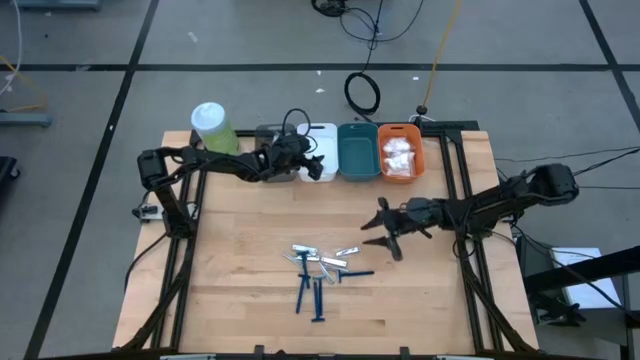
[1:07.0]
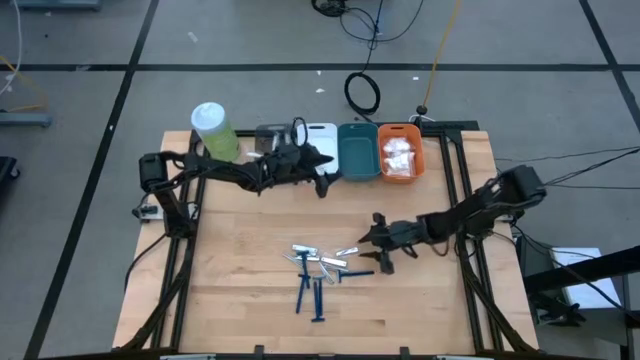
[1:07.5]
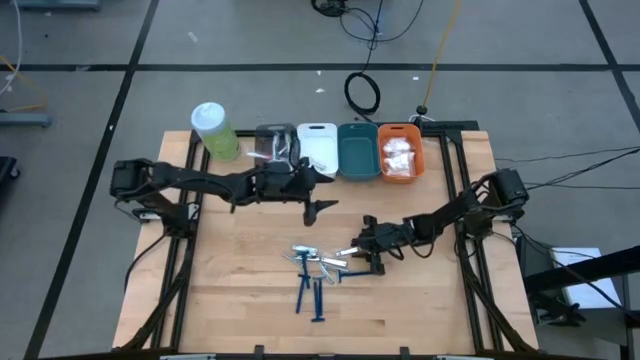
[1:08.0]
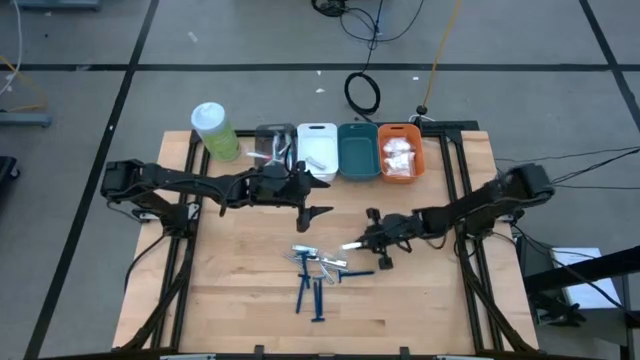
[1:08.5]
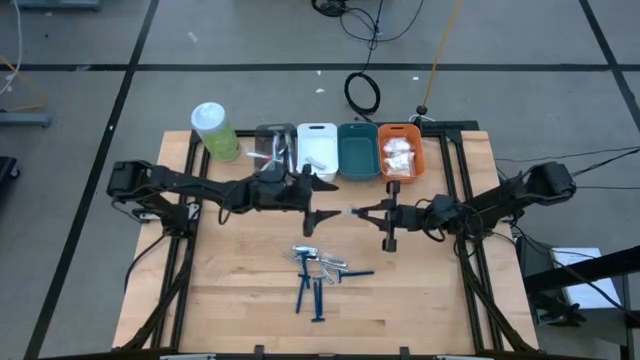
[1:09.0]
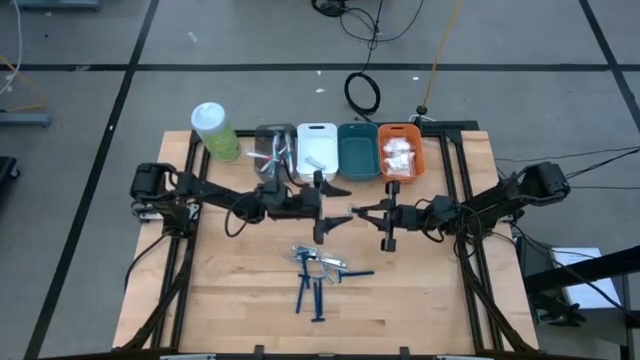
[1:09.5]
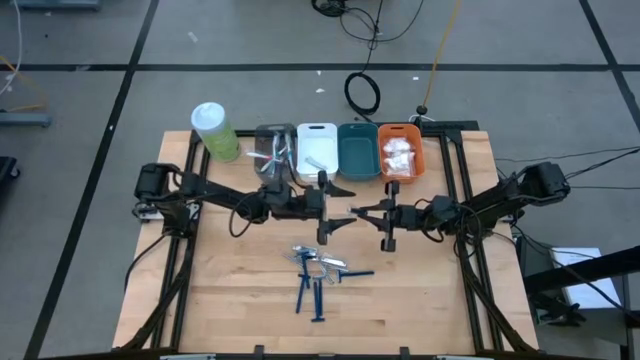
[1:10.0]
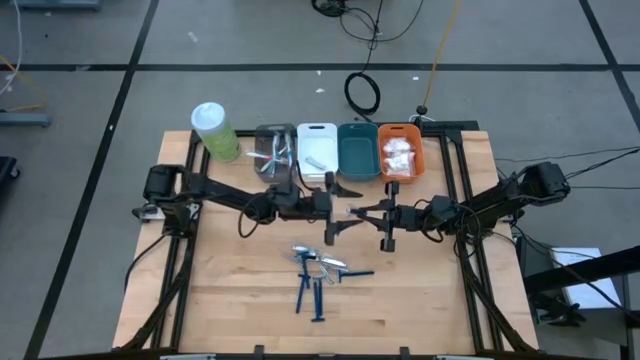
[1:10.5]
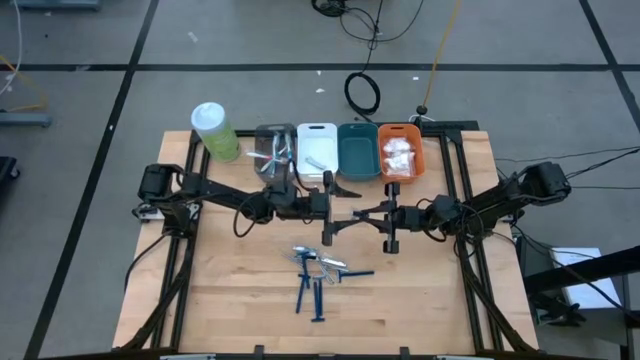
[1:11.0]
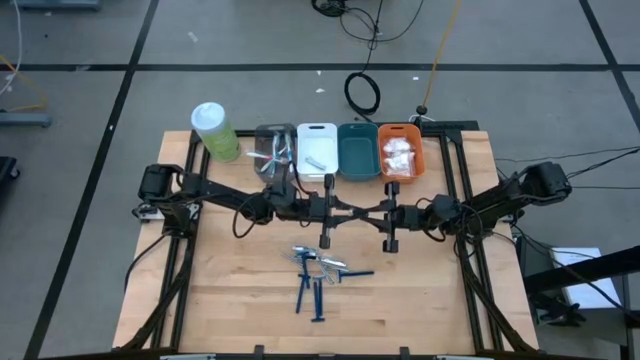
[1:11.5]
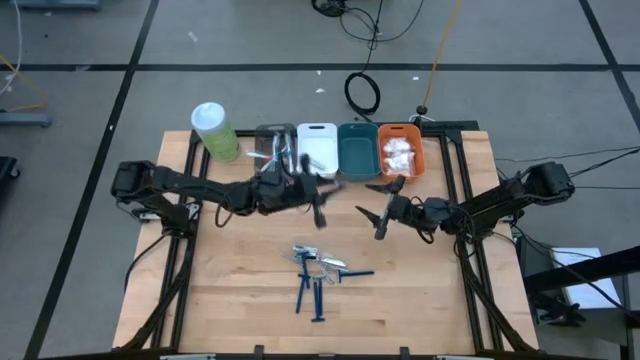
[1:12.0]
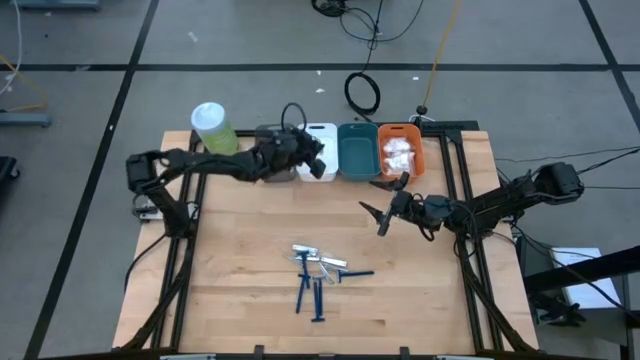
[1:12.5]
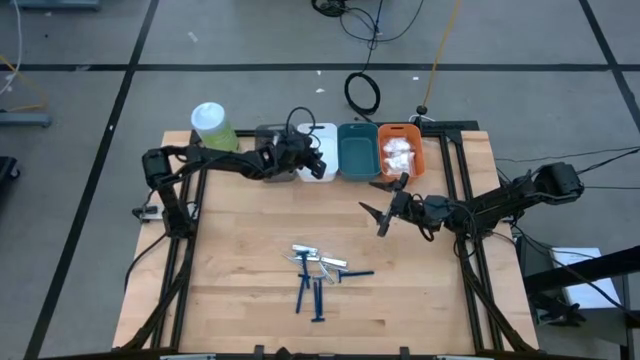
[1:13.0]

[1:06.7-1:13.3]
Task: Pick & Place Travel size toiletries
Put the silver nail cutter into the white bin

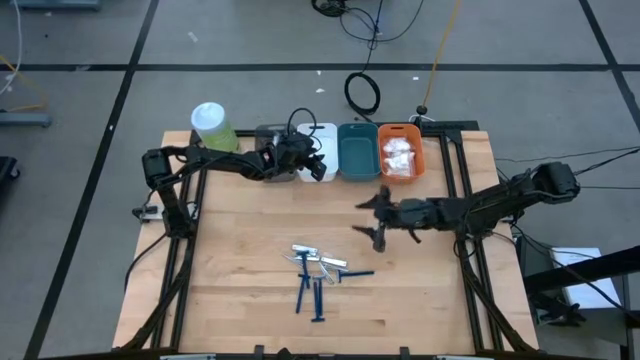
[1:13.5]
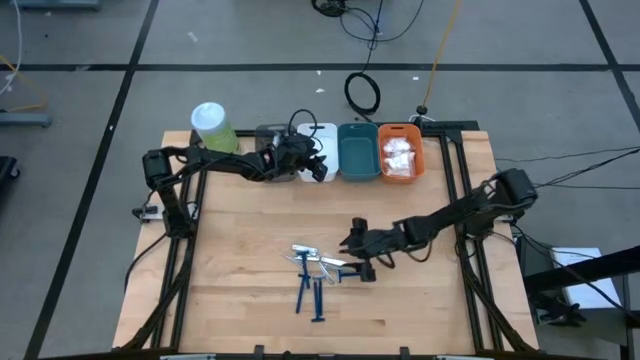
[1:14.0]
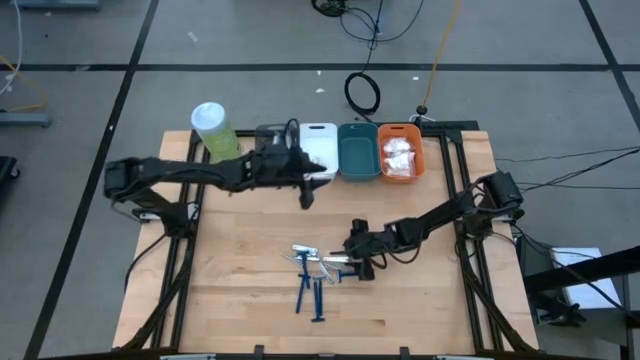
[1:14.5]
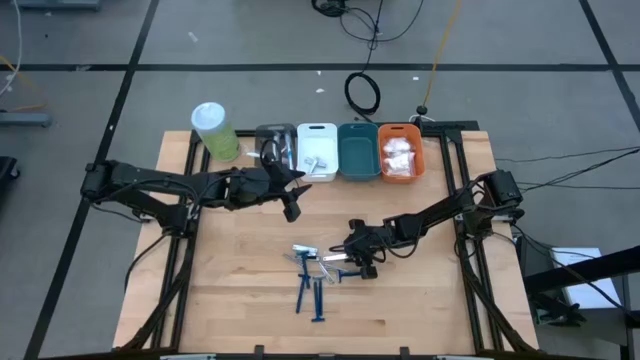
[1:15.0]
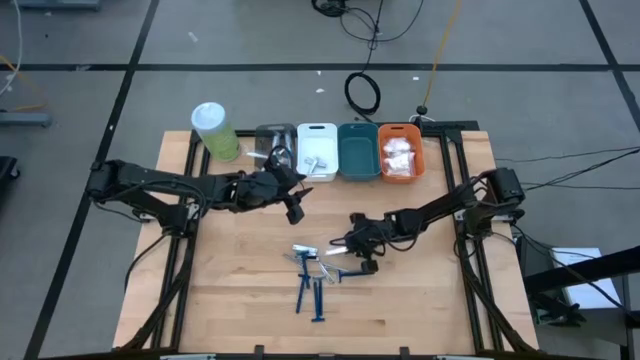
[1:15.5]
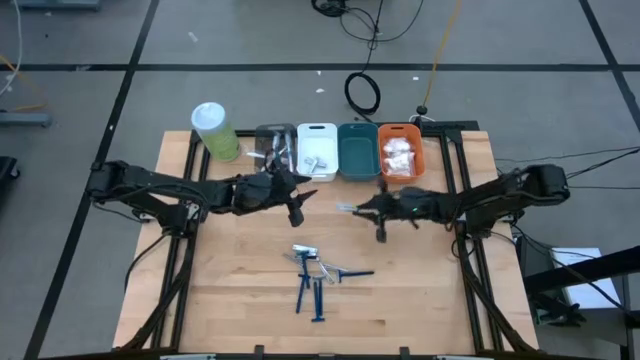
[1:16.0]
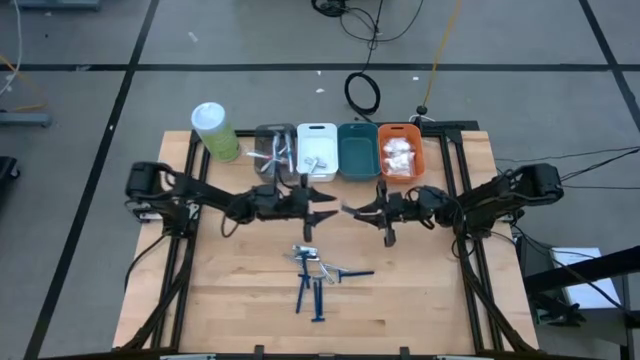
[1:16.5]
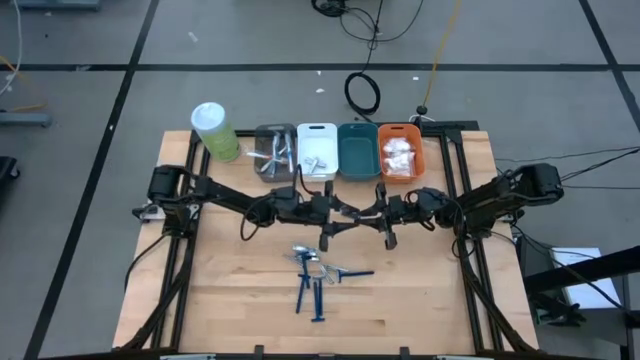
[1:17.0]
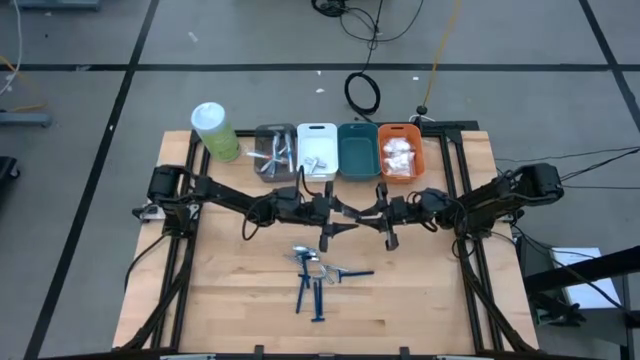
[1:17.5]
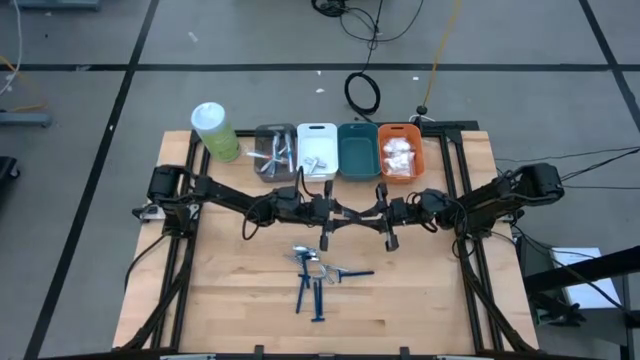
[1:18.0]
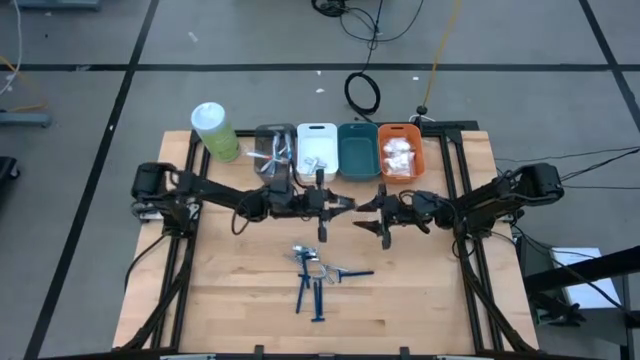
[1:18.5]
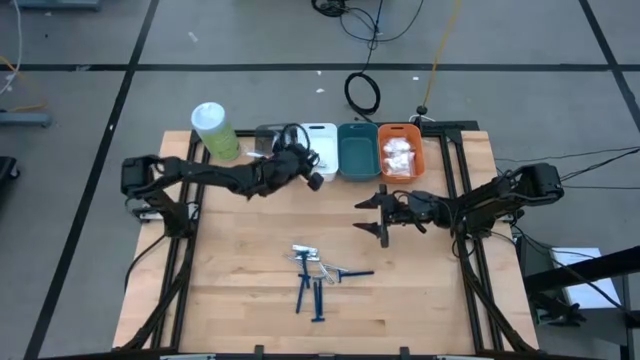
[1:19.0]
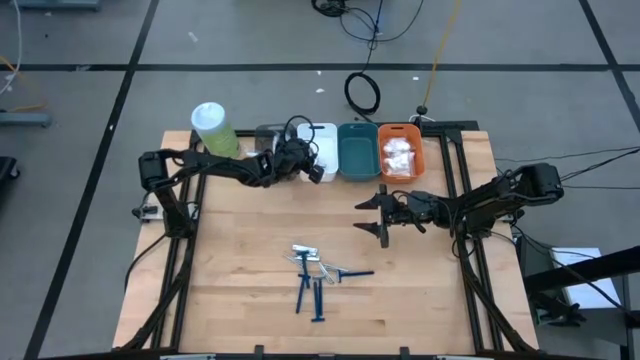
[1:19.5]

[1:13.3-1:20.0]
Put the silver nail cutter into the white bin

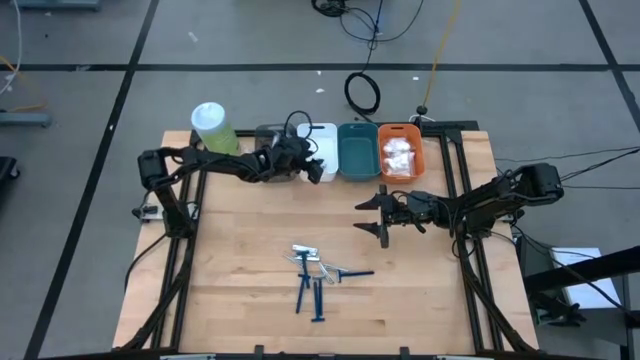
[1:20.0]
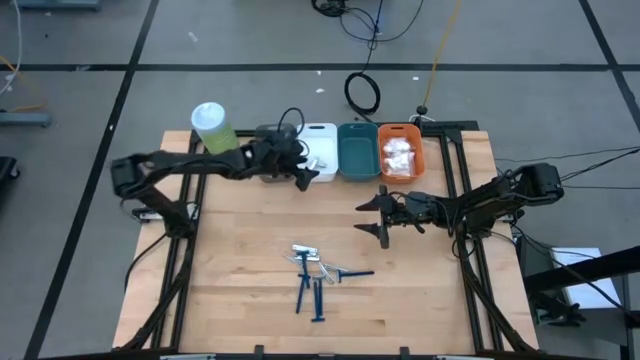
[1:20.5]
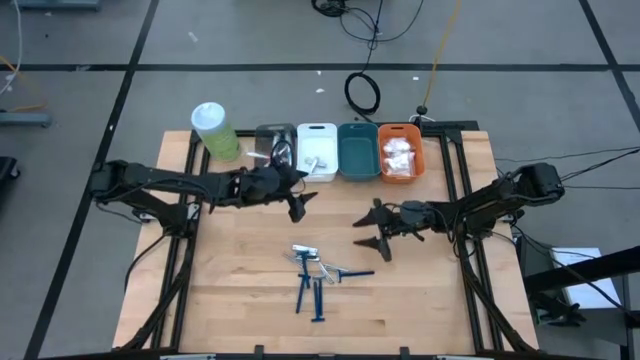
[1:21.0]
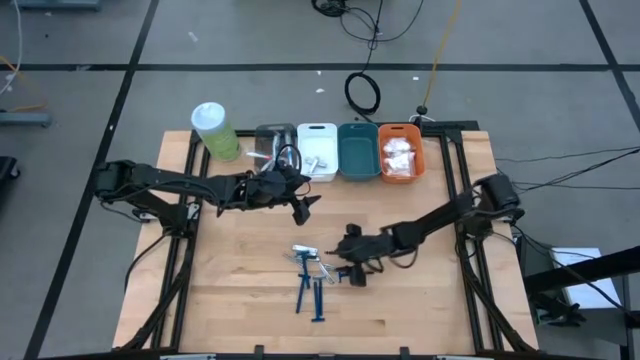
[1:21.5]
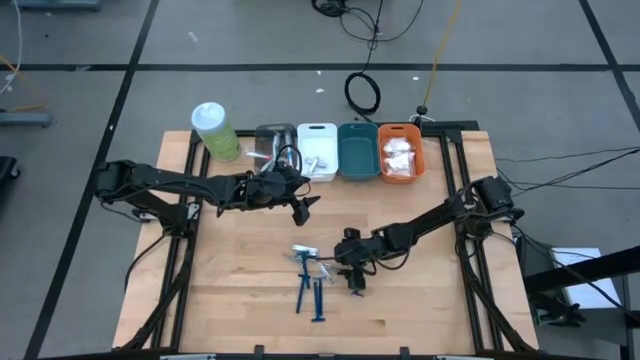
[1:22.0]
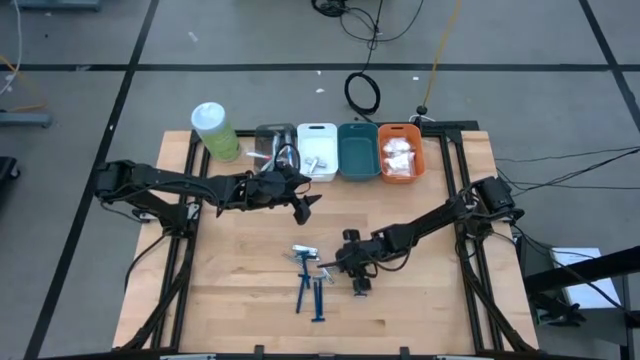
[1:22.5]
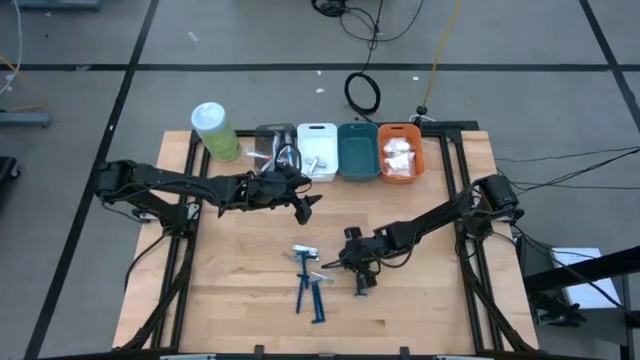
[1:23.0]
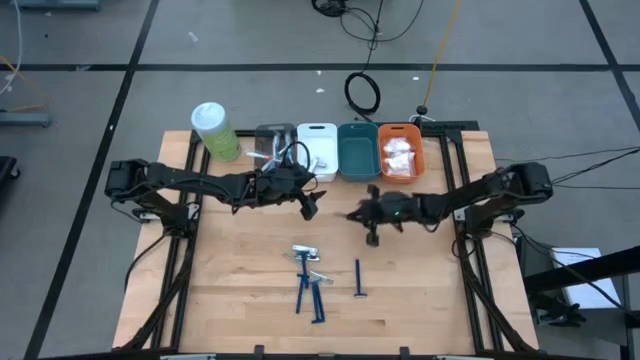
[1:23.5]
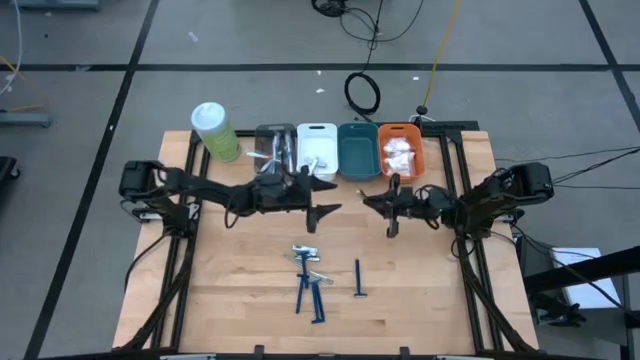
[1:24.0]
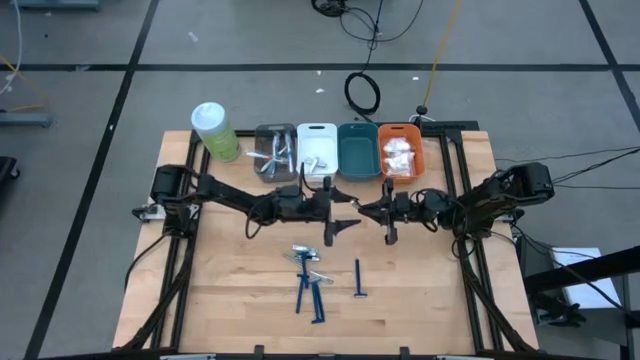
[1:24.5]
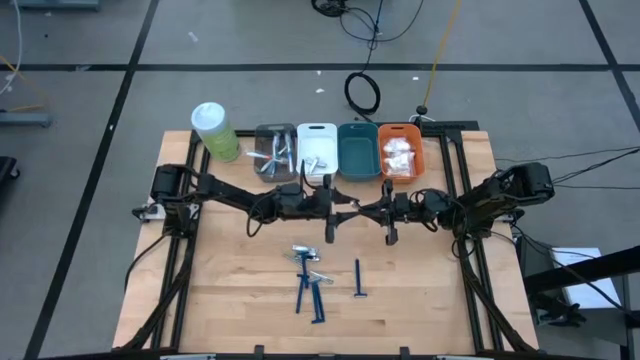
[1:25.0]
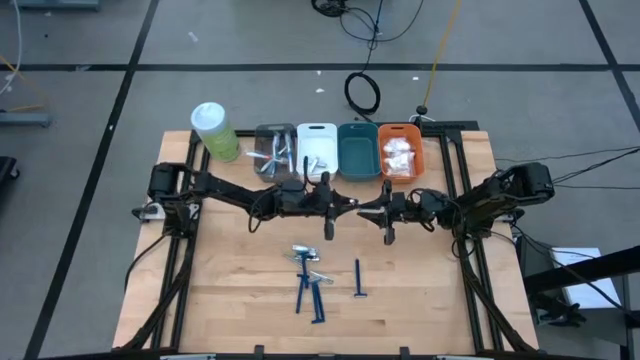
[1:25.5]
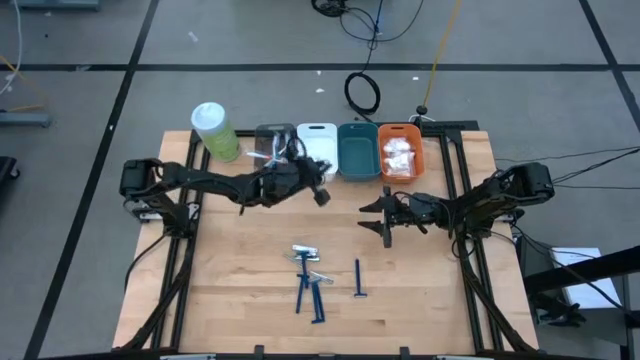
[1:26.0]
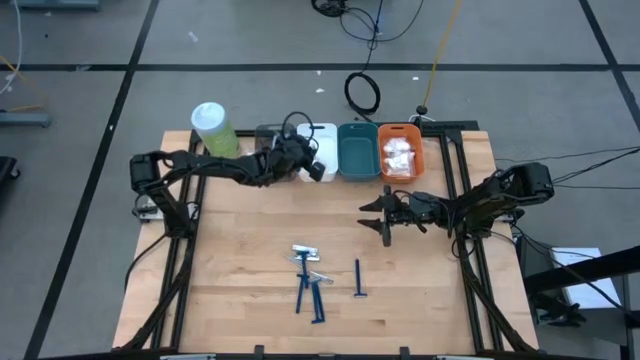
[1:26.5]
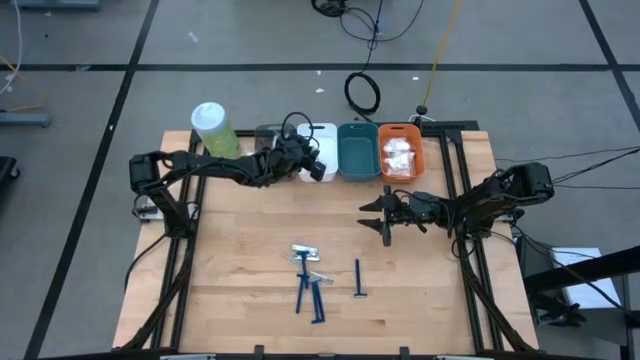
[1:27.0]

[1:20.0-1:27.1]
Put the silver nail cutter into the white bin

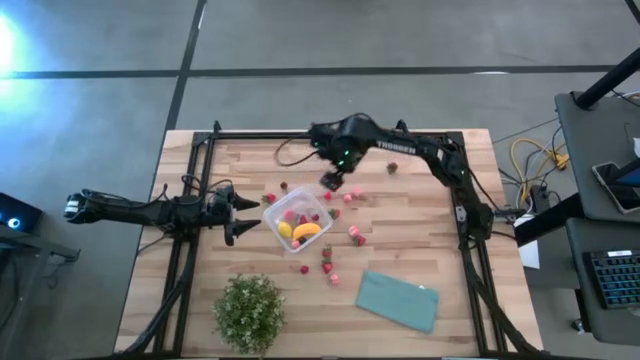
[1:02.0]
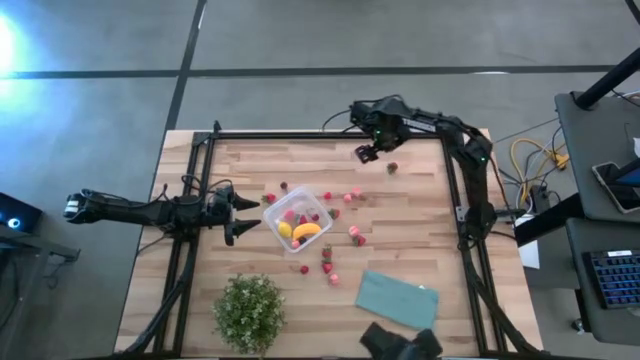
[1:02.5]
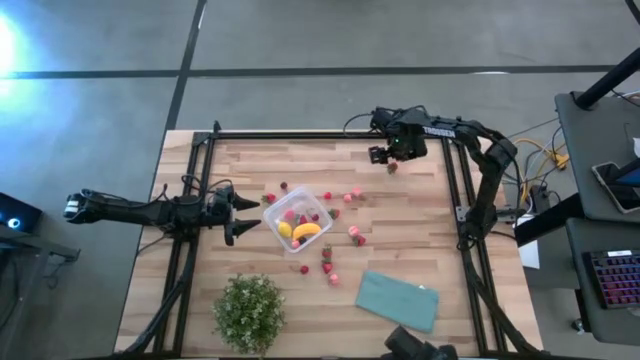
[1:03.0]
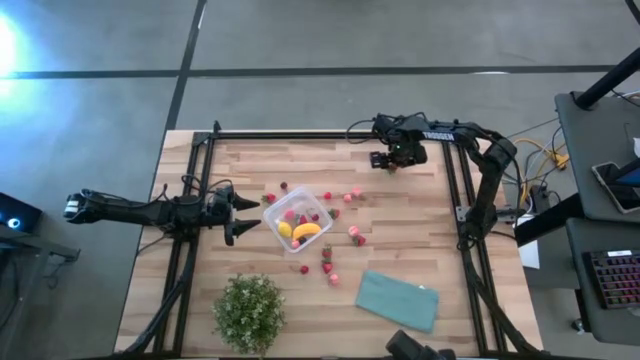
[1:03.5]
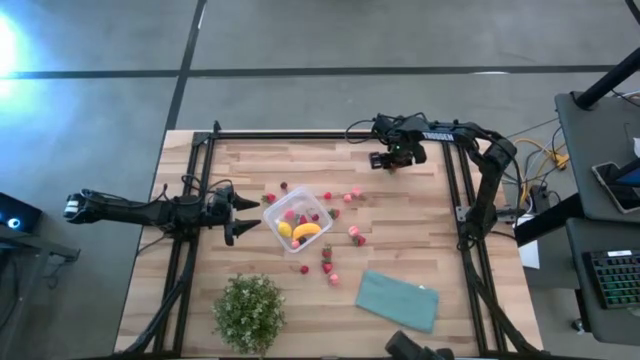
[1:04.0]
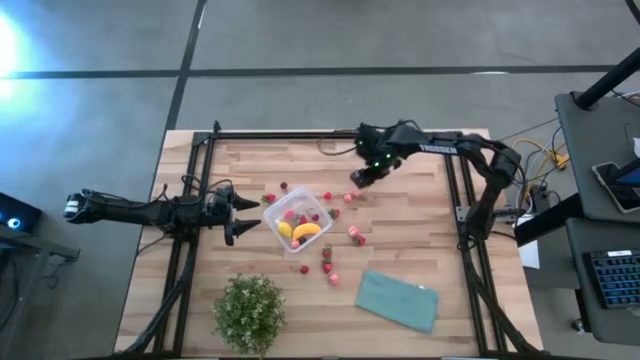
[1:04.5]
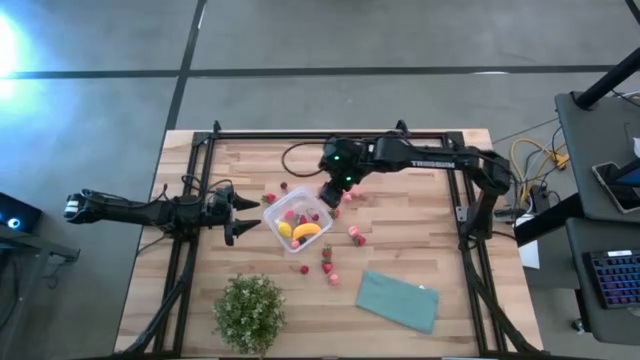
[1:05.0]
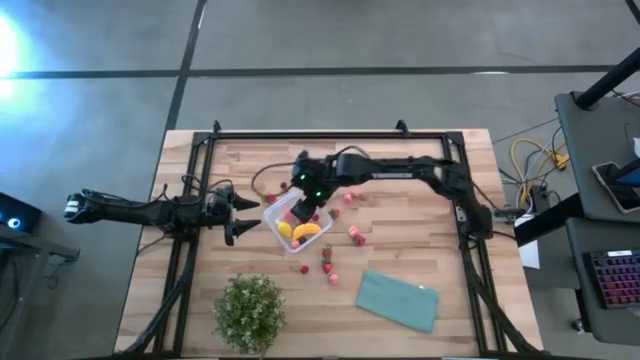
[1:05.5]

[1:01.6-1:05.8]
Task: Pick and placing Produce into tupperware
Put the red strawberry into the transparent bin
